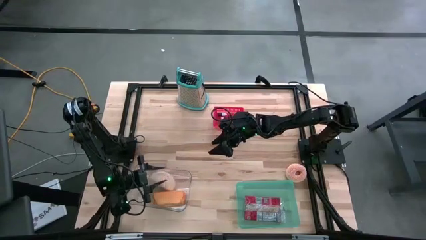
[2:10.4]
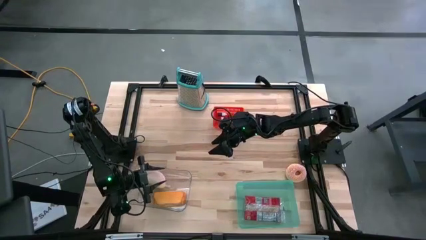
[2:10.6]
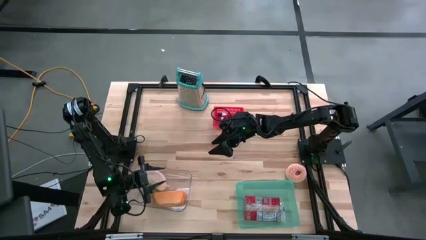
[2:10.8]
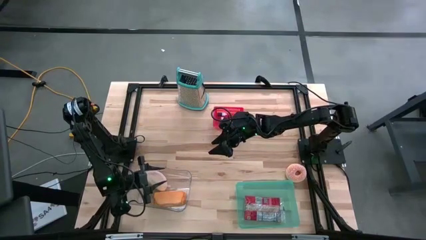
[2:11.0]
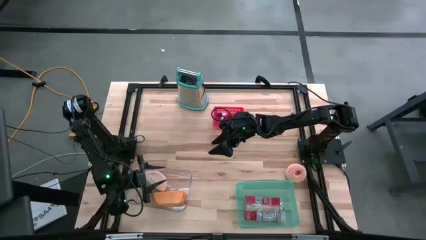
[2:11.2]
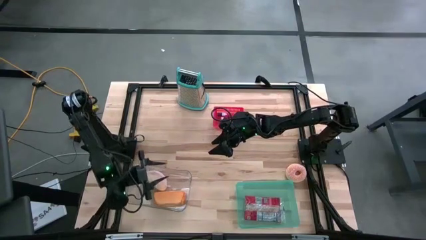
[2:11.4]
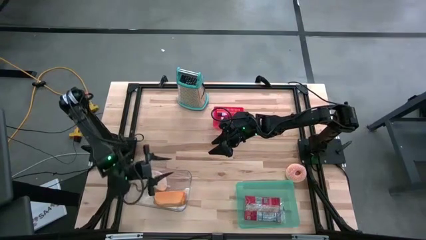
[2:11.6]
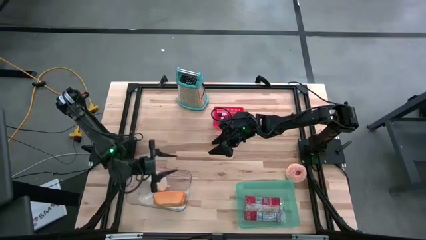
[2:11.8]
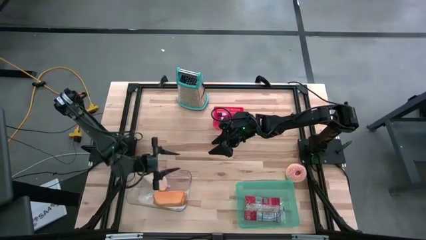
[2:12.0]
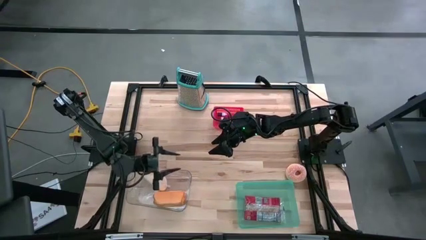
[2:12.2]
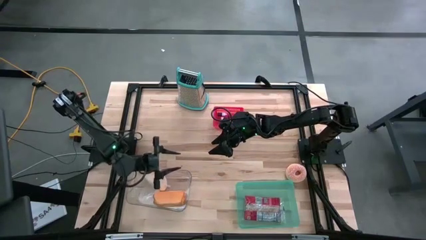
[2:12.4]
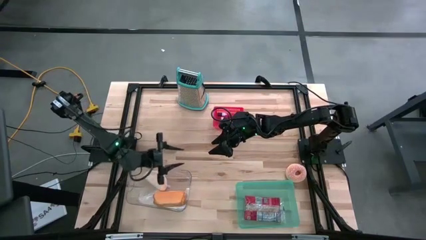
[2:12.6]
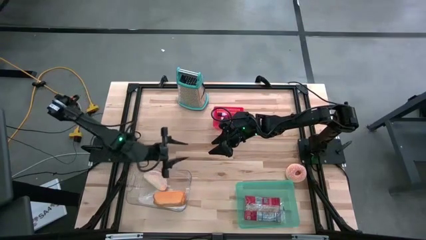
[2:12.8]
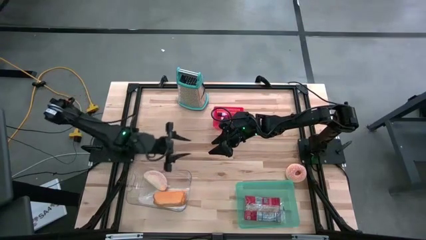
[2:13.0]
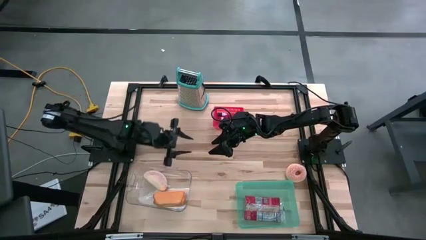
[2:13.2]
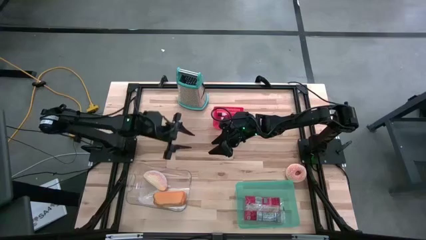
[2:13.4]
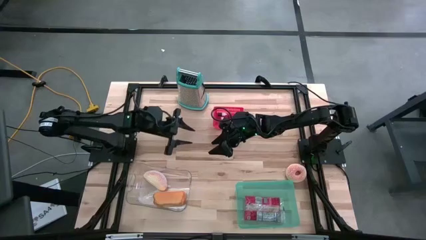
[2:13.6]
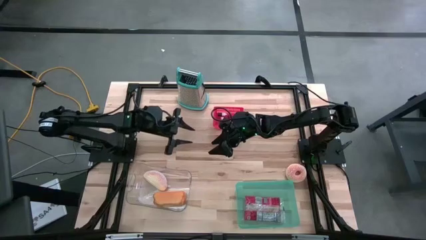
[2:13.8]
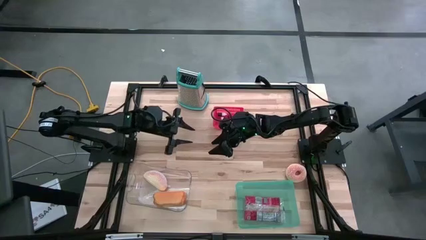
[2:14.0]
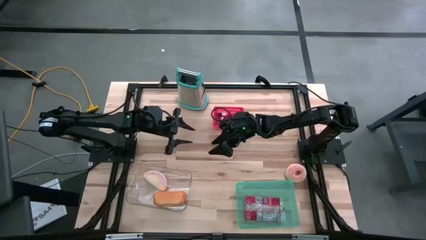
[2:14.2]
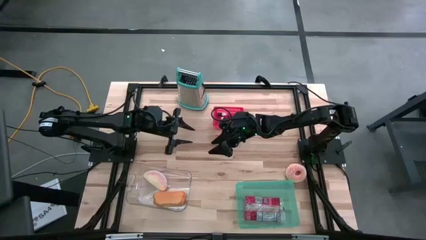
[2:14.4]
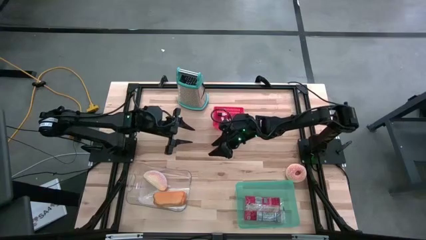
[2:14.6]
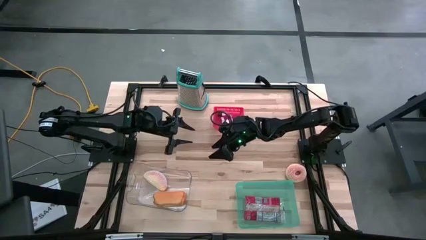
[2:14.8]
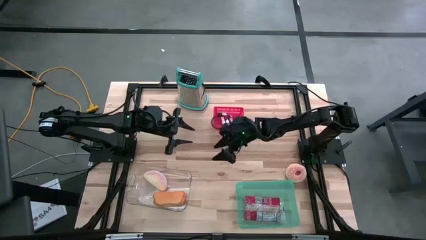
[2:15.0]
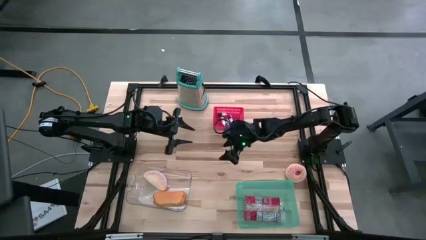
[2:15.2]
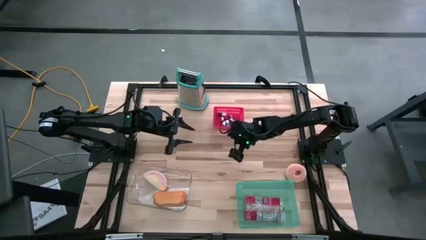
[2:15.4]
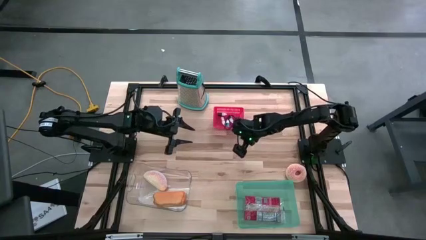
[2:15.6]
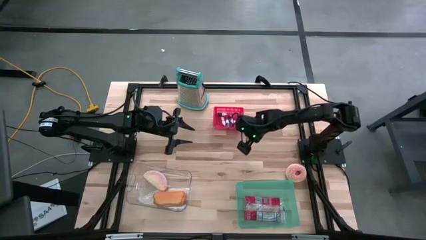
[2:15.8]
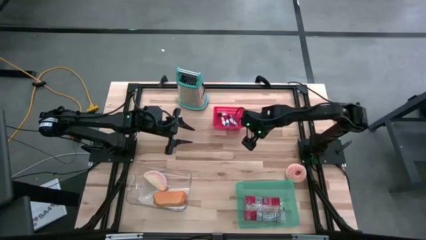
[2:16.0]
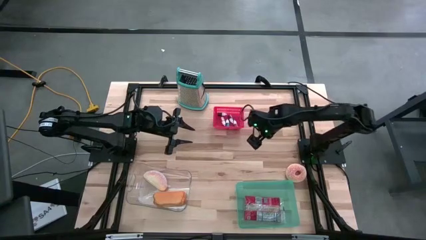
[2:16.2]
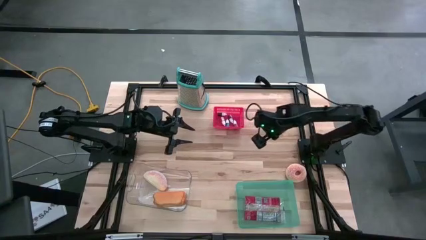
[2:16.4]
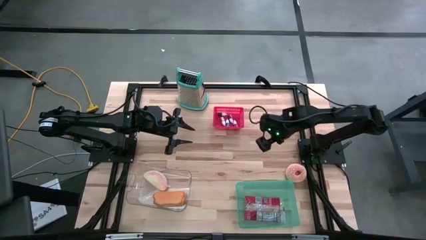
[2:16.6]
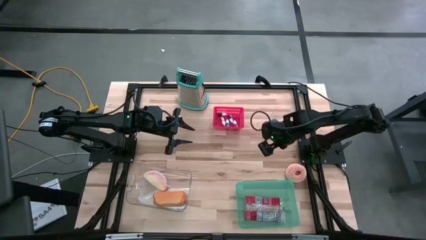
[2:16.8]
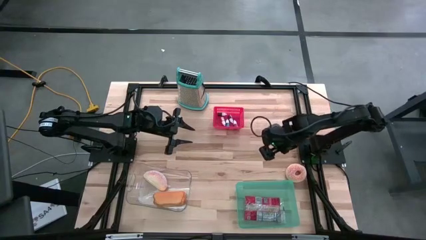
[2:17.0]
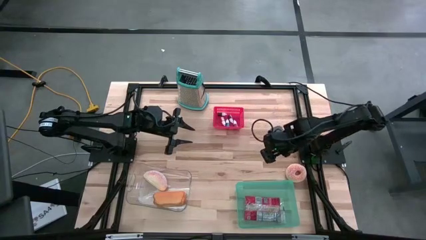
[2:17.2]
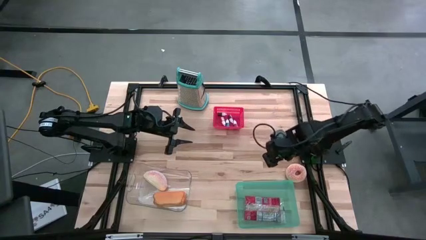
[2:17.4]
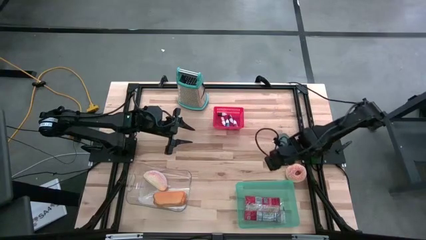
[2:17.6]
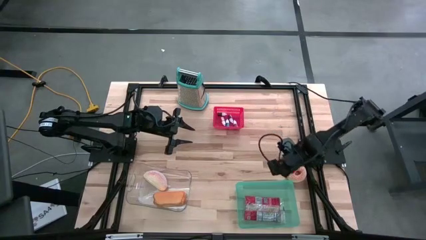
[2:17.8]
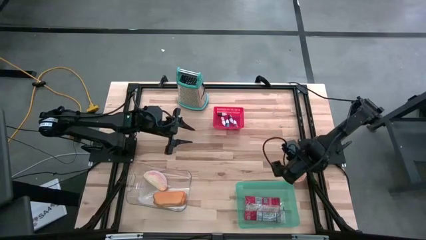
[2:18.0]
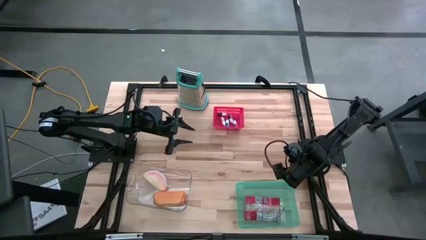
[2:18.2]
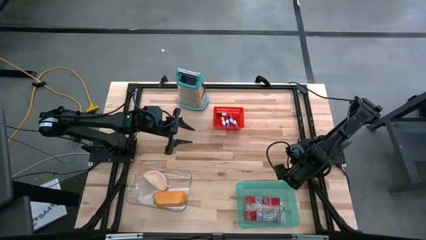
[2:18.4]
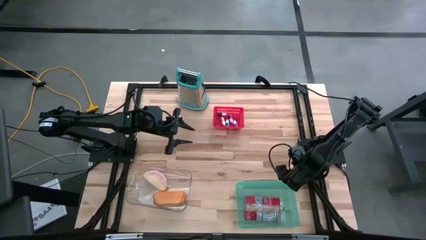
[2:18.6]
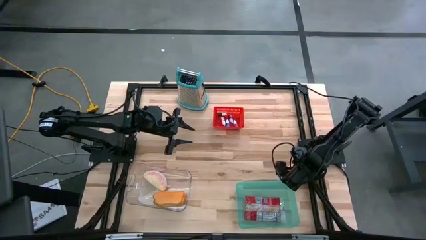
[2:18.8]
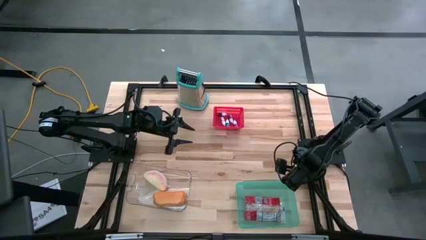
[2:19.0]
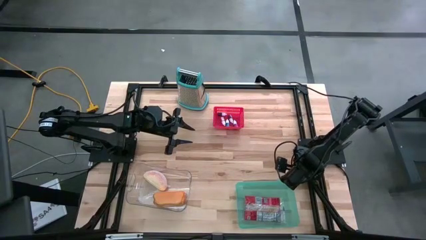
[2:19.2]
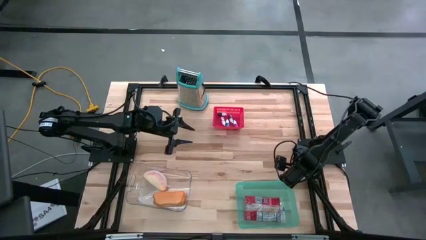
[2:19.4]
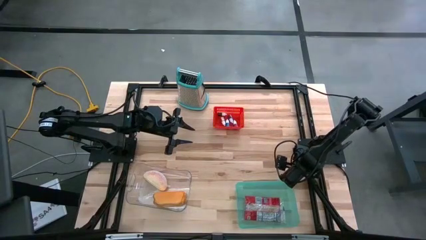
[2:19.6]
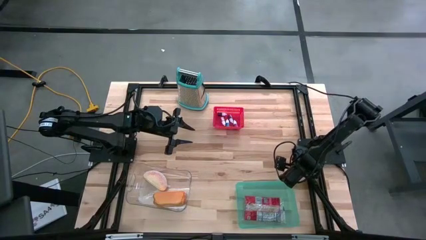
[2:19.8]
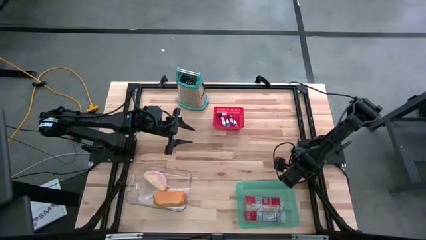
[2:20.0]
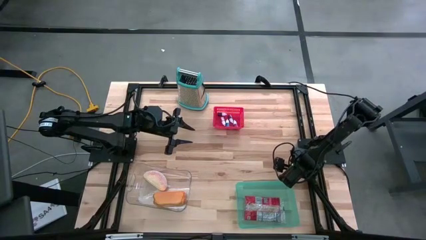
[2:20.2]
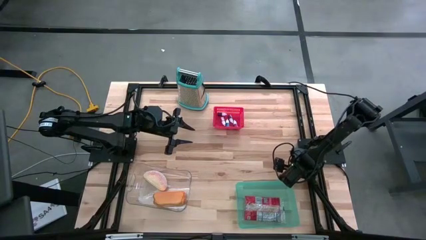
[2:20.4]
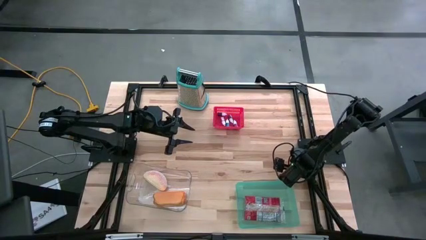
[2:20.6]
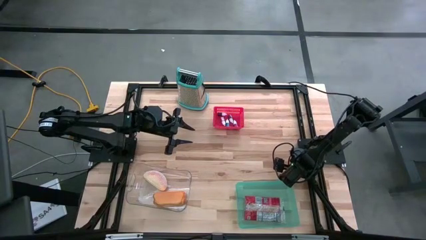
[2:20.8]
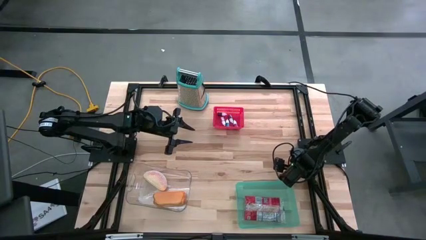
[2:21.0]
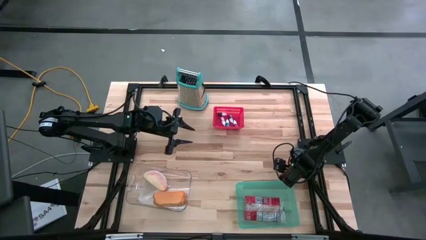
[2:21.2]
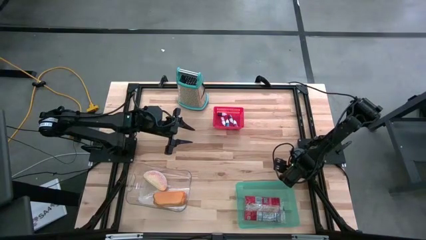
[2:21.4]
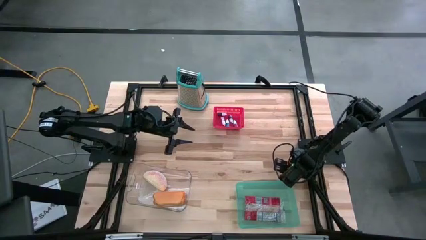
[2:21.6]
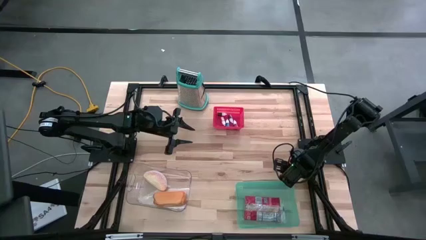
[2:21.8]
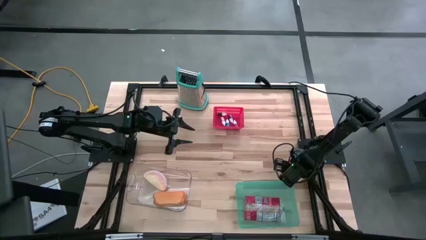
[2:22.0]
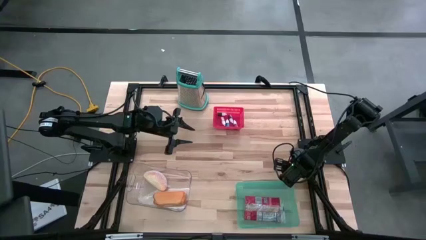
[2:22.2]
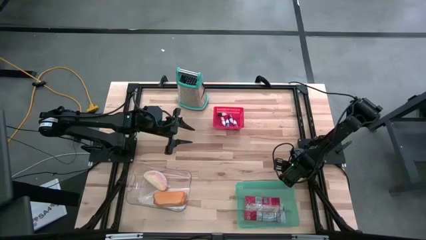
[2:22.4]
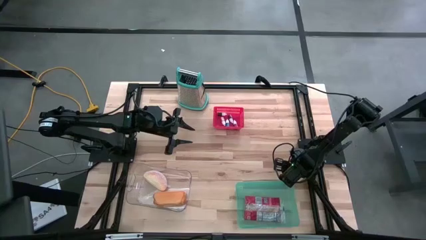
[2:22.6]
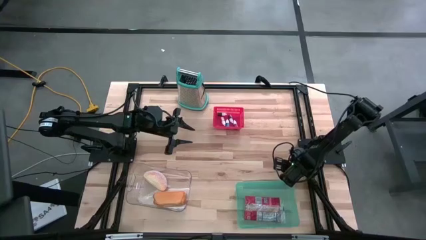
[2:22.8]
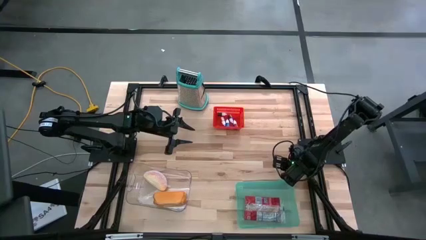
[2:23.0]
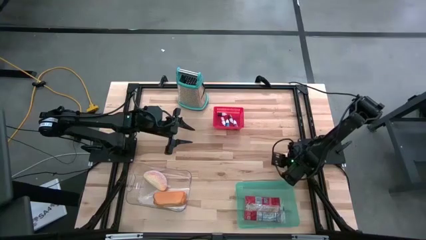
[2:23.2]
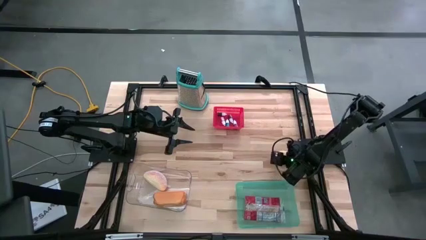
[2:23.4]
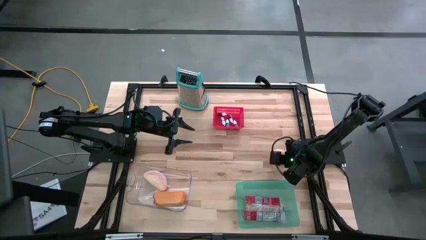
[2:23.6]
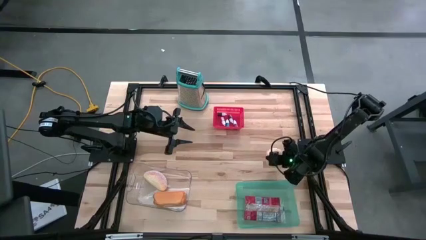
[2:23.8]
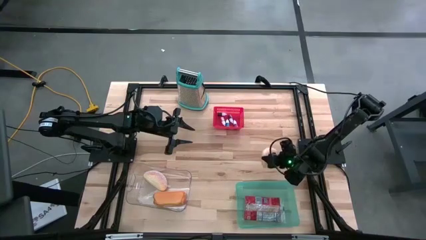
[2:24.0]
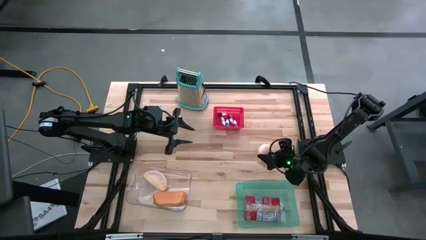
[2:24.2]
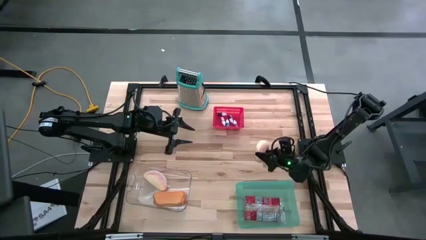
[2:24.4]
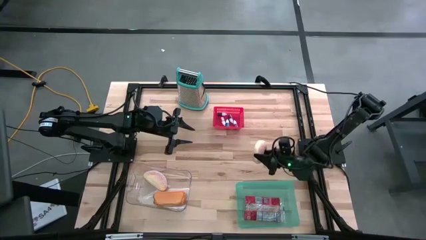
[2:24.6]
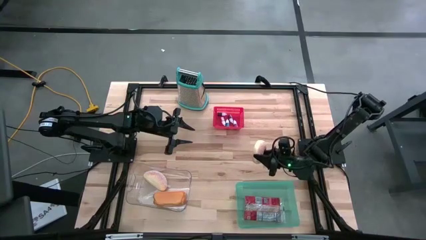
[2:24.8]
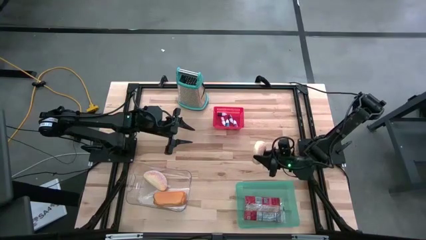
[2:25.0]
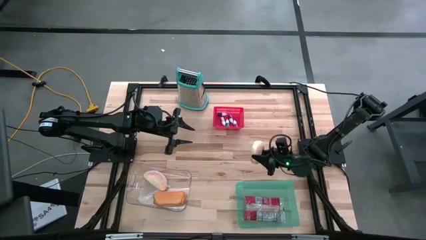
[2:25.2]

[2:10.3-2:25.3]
Put the donut into the transparent bin
